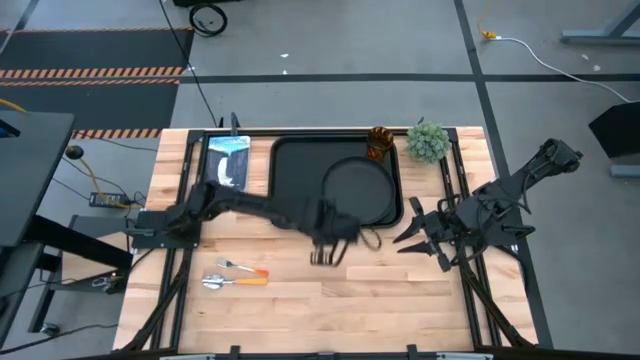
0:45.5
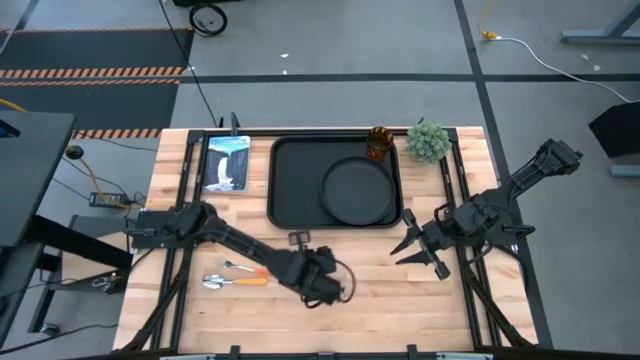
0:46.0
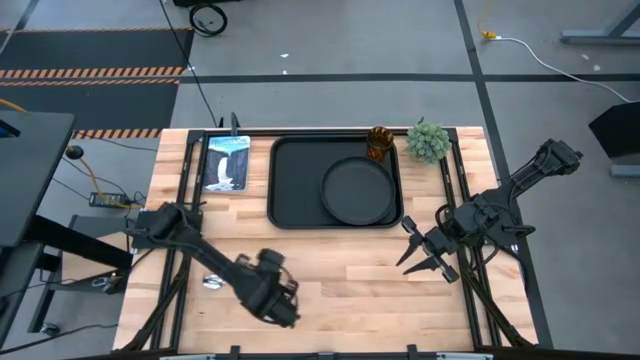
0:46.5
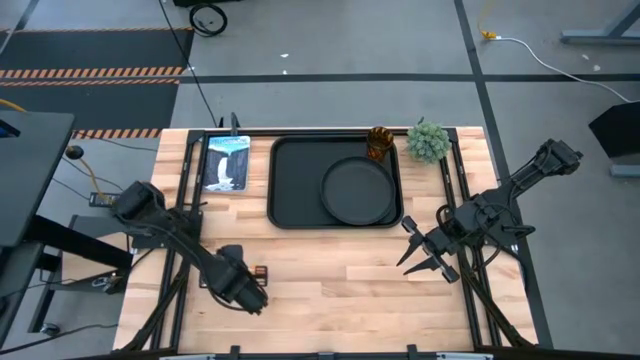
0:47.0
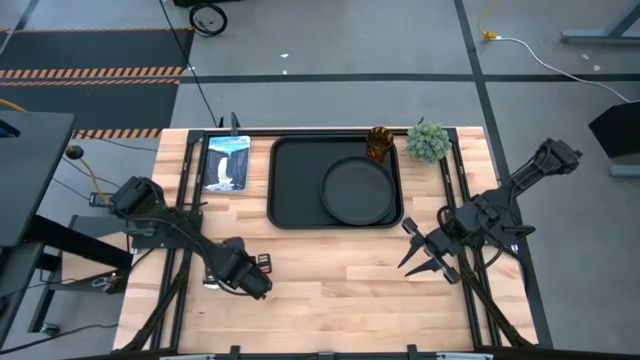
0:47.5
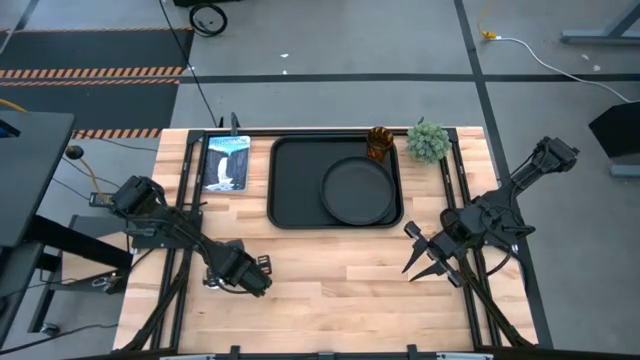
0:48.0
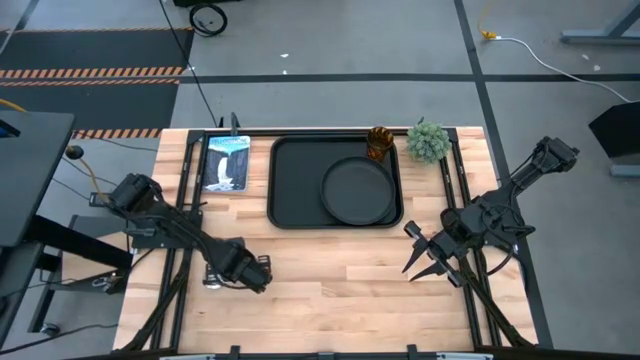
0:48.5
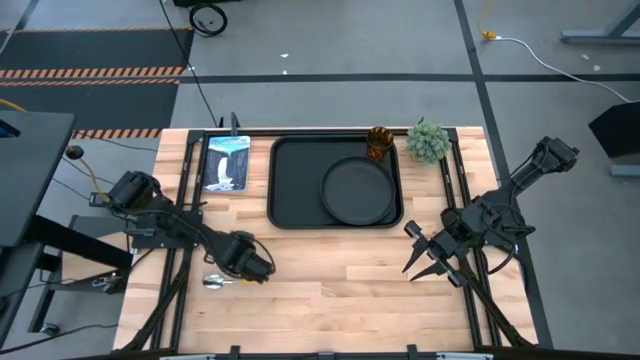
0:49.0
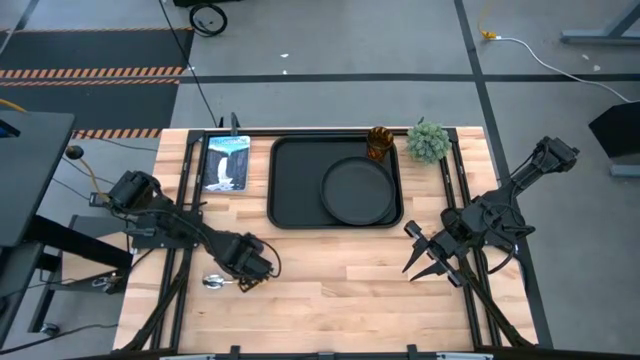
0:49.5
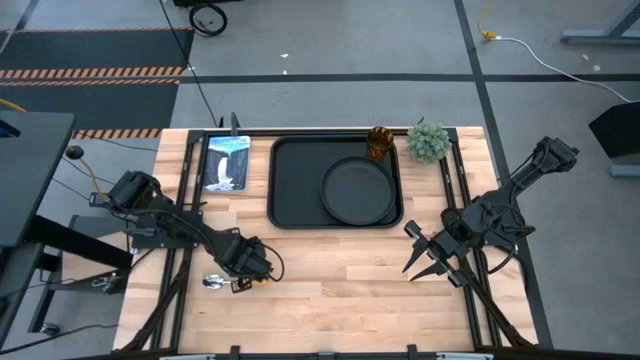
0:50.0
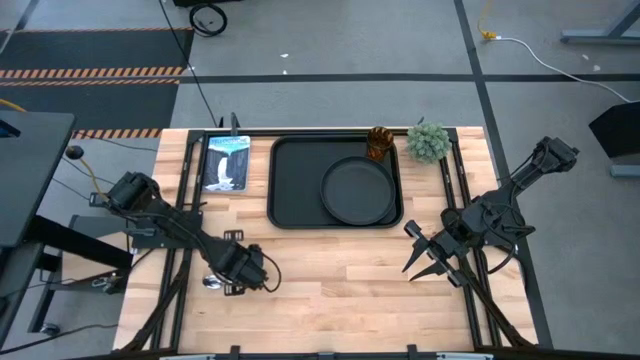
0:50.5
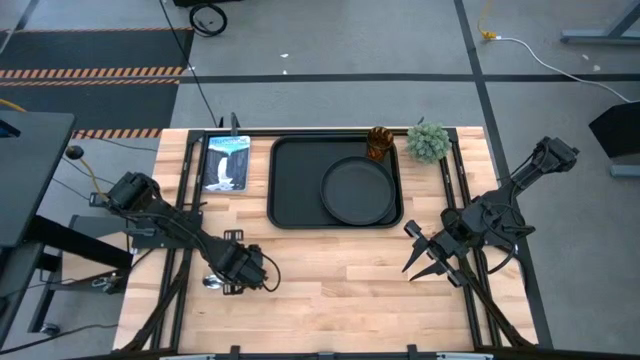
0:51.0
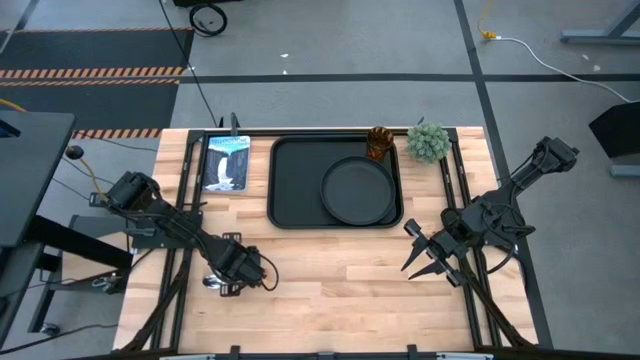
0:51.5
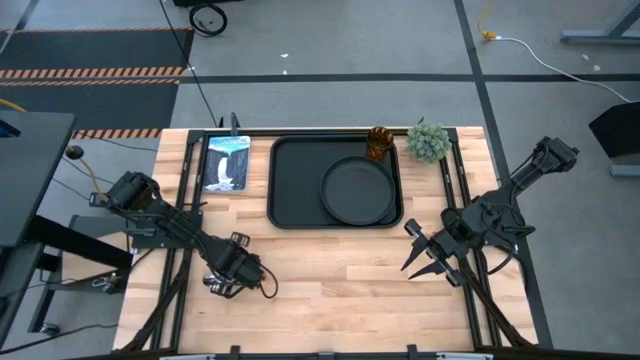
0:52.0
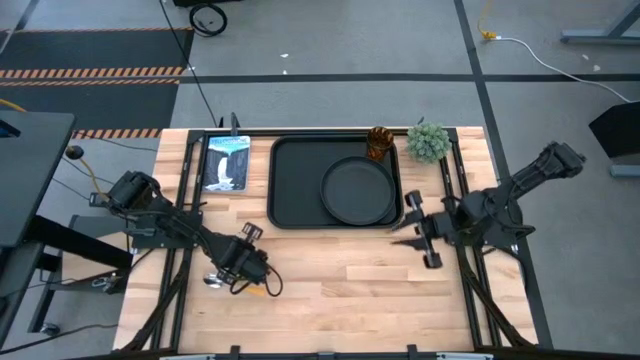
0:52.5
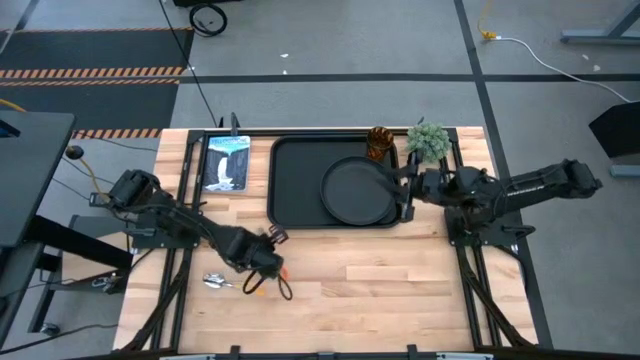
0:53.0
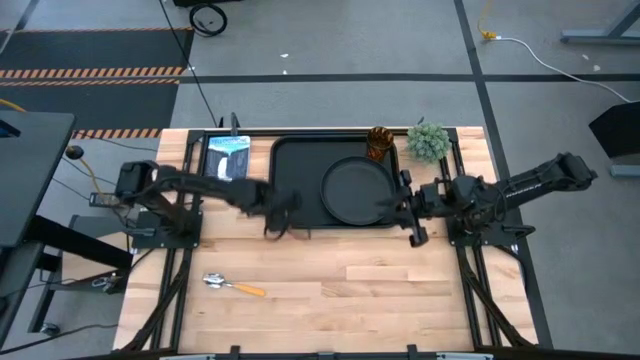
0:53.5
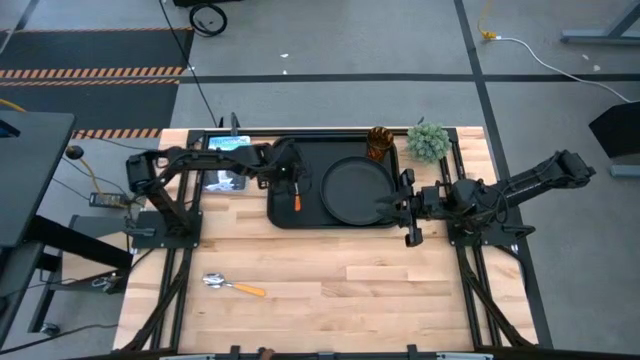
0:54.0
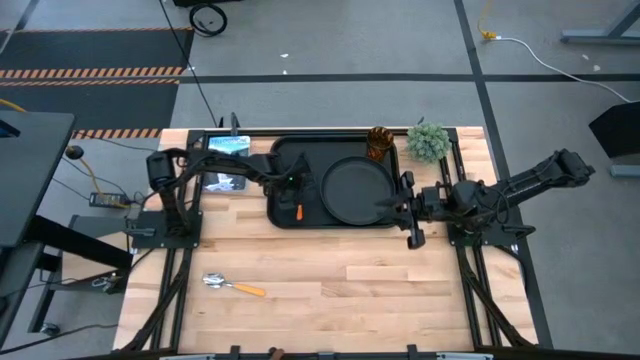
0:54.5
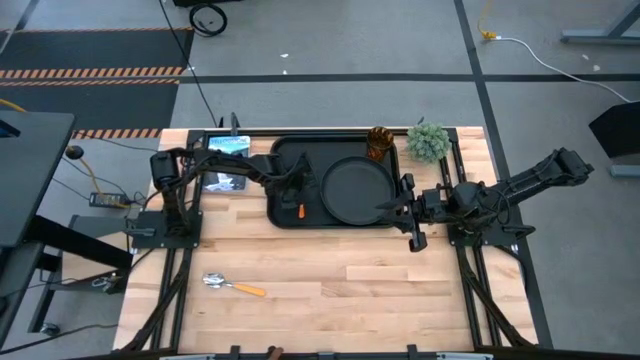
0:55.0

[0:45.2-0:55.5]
Task: Pick and place plate/cup/fork/spoon on tray
Put the orange fork on the black tray to the left of the black plate

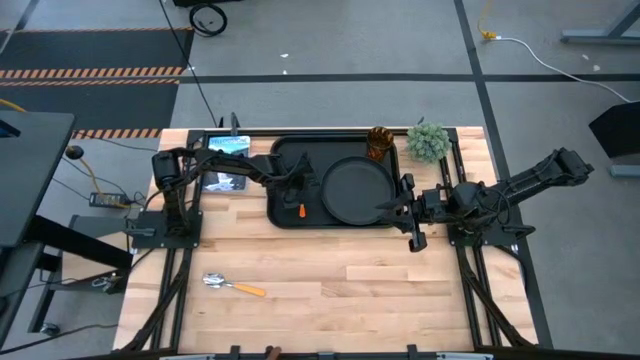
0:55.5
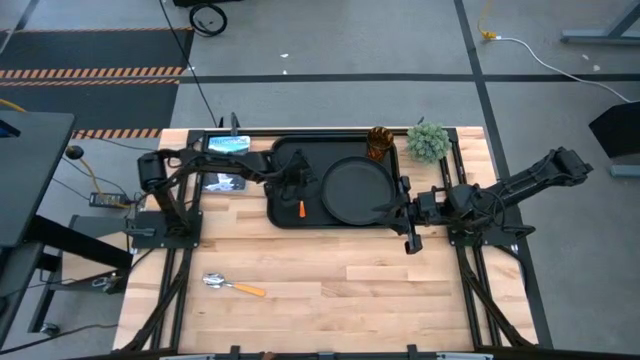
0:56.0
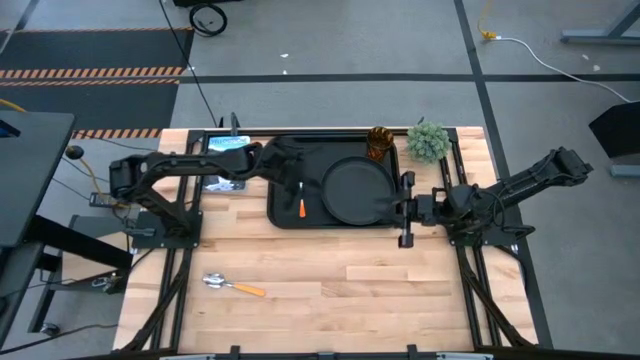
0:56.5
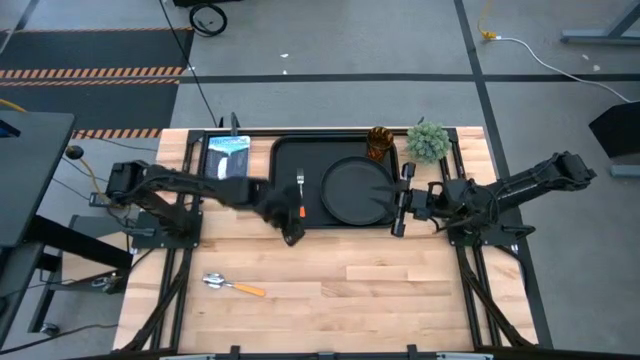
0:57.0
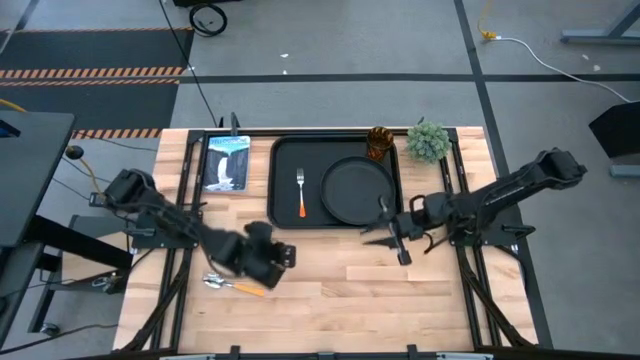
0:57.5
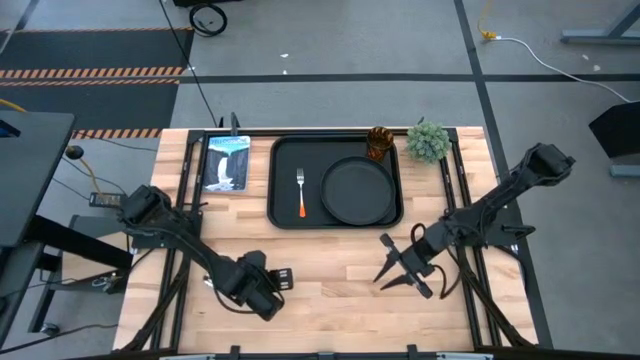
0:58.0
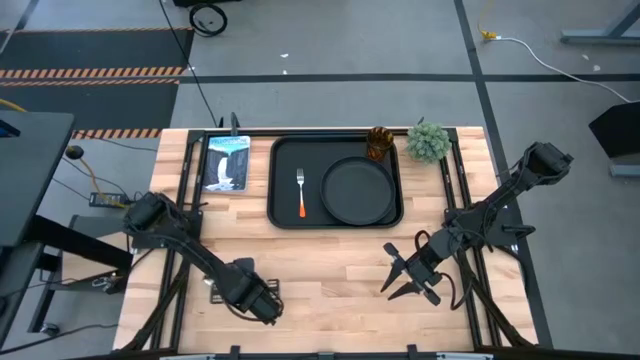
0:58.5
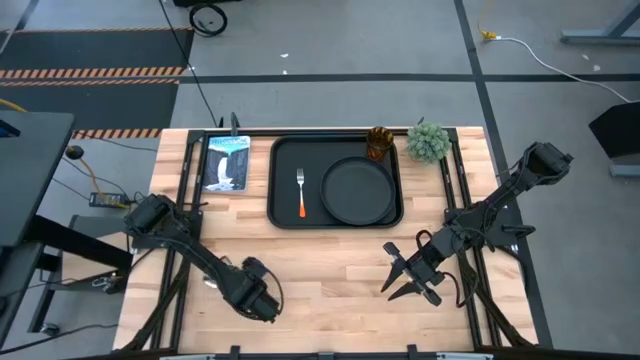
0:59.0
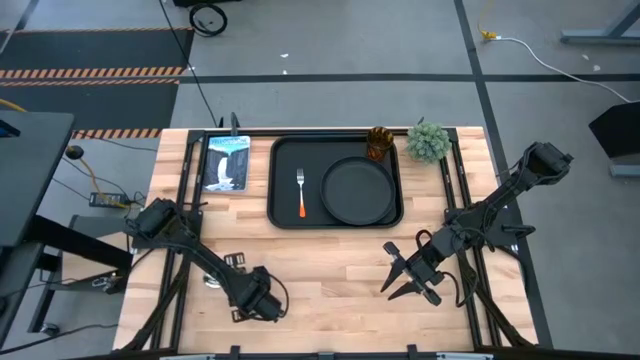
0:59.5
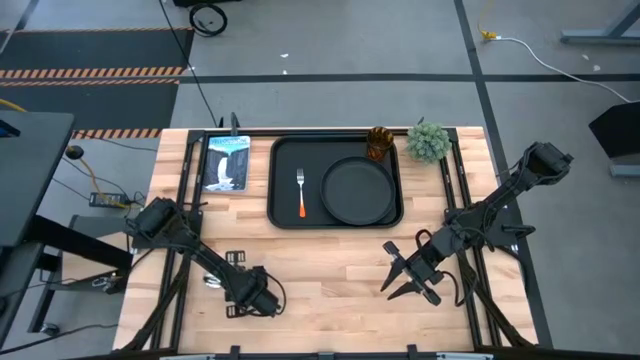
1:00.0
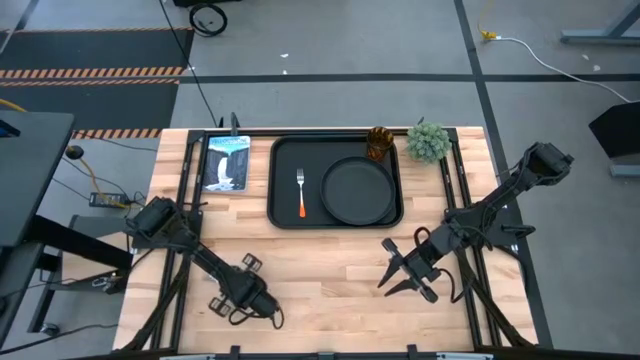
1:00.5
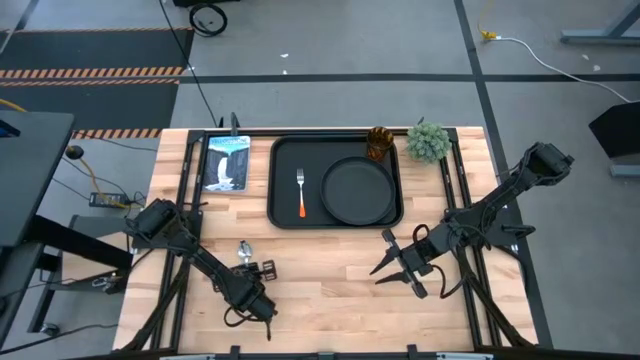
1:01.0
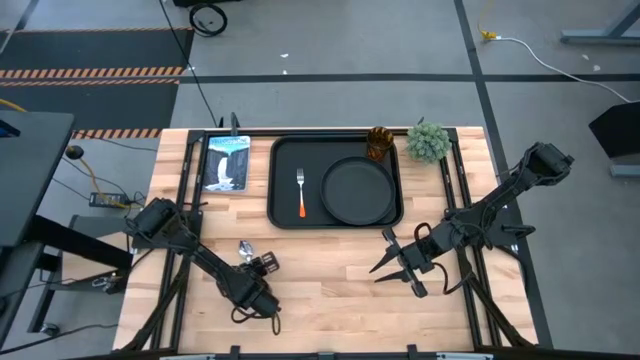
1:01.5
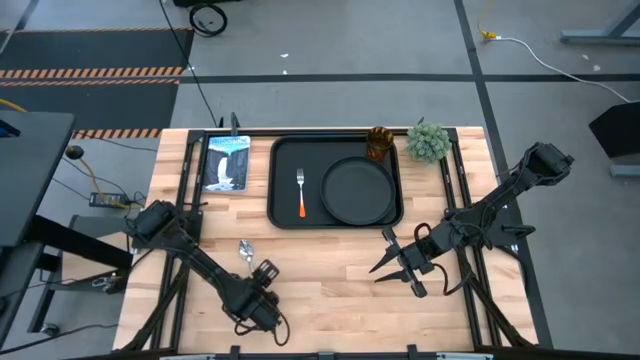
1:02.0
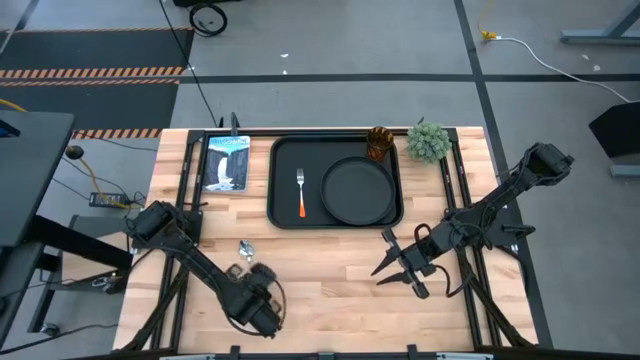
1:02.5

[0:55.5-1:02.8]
Put the spoon on the black tray to the left of the orange fork

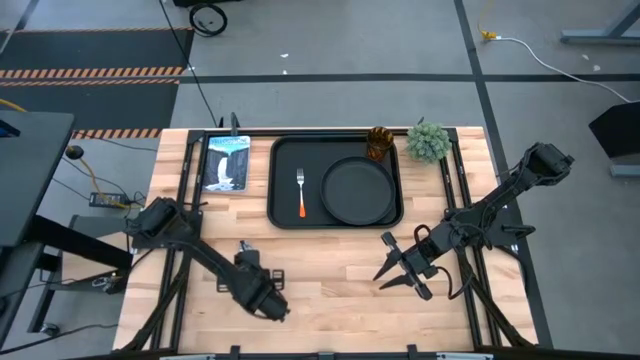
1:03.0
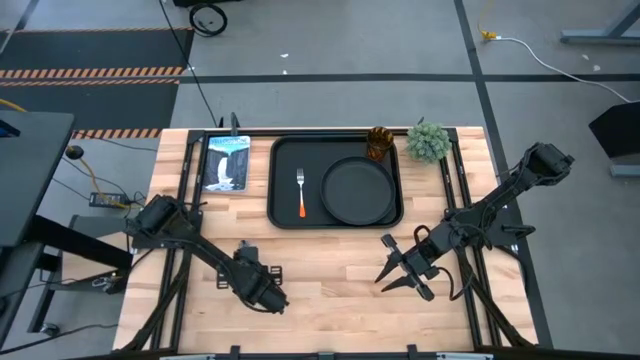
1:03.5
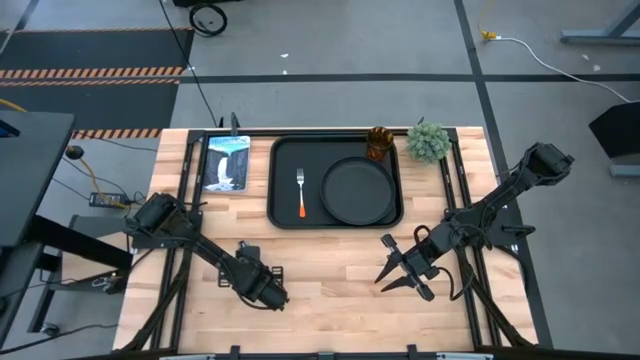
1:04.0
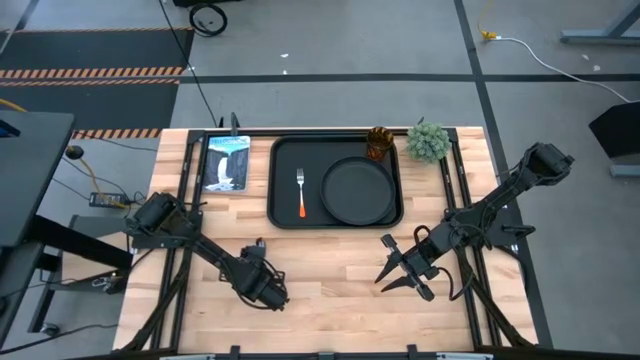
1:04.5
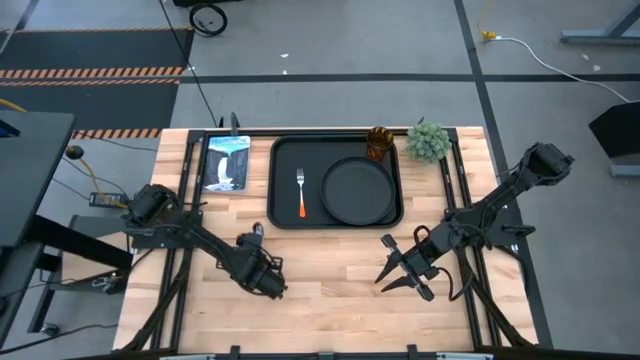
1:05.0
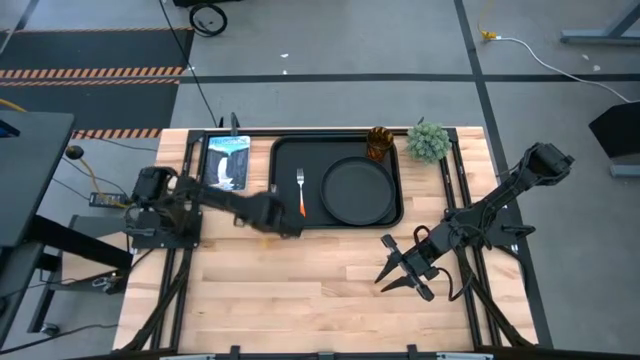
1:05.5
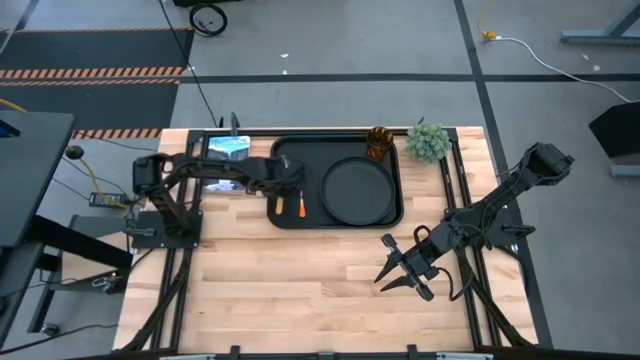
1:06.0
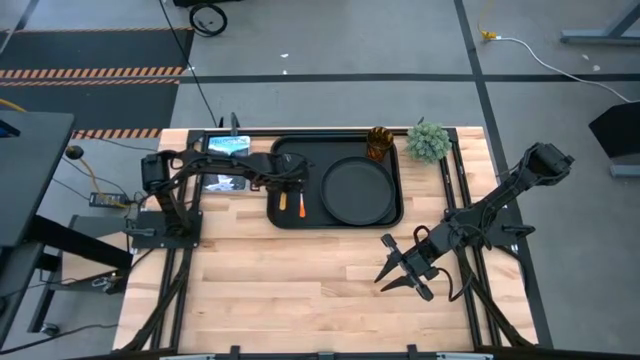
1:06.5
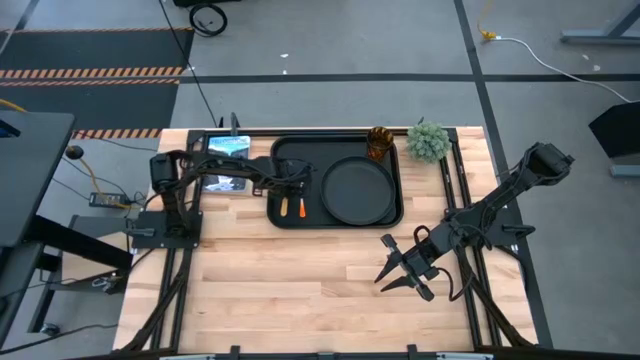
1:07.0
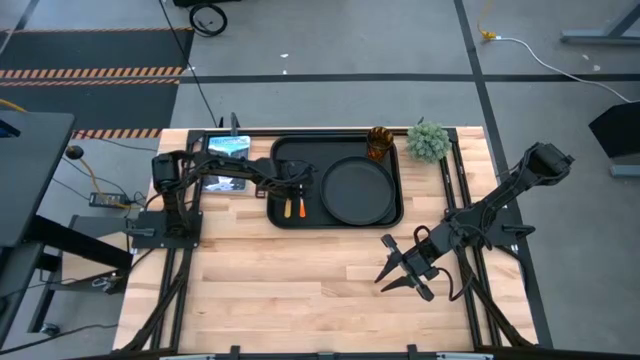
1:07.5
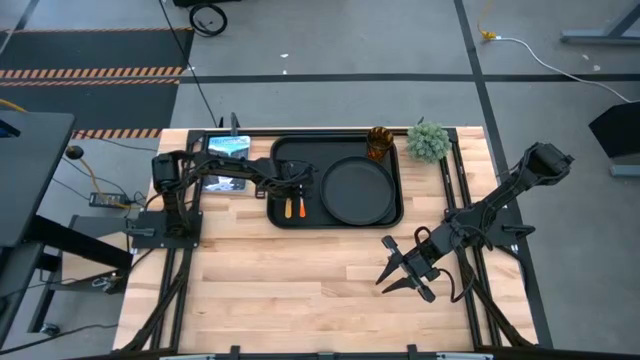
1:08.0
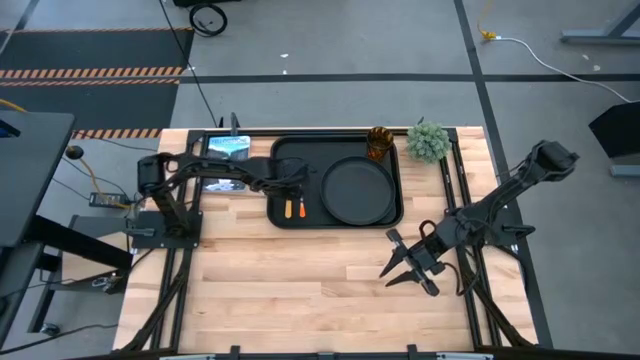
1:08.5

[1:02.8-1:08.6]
Put the spoon on the black tray to the left of the orange fork
